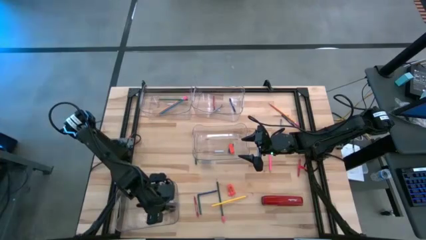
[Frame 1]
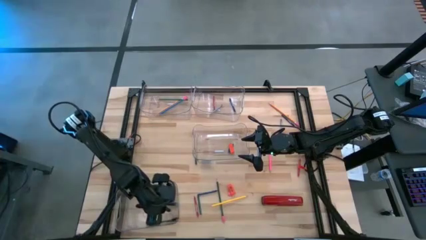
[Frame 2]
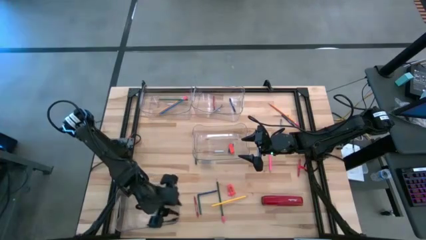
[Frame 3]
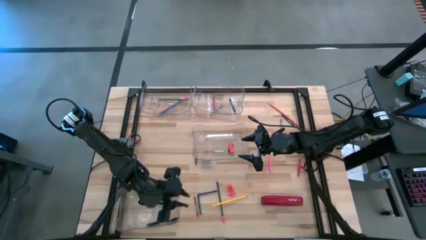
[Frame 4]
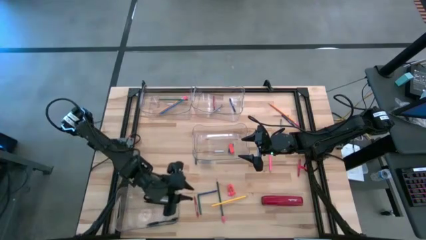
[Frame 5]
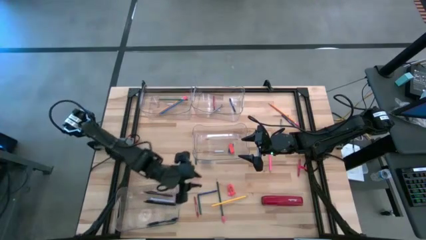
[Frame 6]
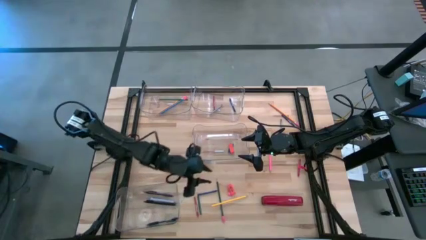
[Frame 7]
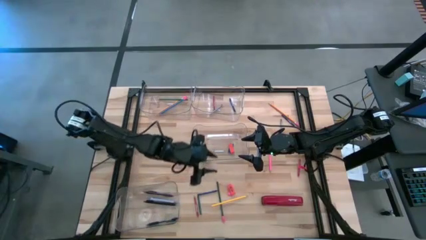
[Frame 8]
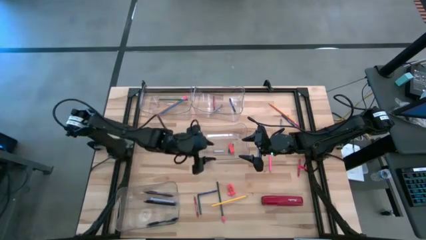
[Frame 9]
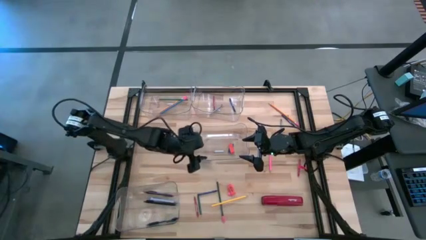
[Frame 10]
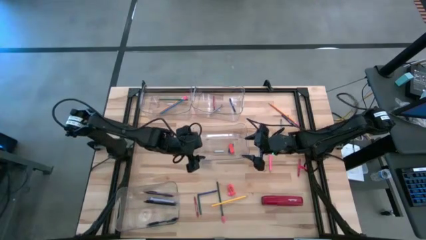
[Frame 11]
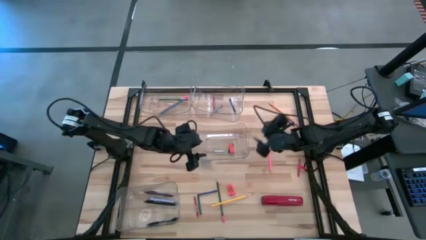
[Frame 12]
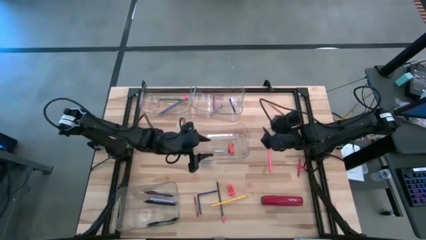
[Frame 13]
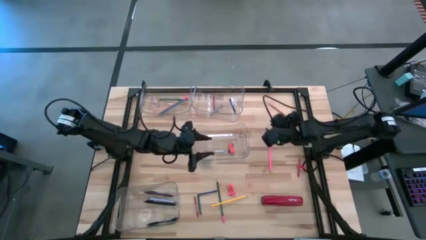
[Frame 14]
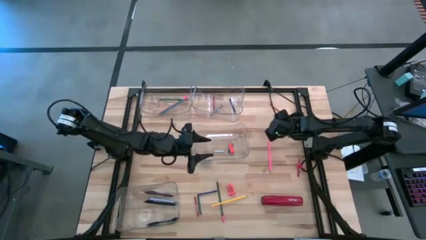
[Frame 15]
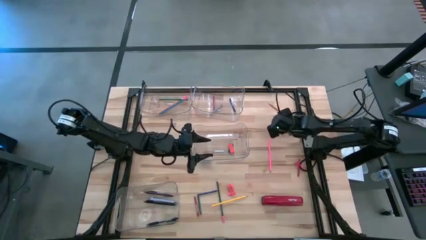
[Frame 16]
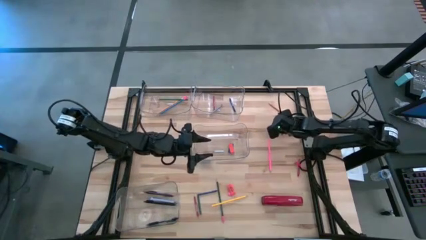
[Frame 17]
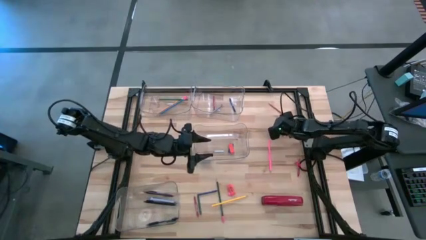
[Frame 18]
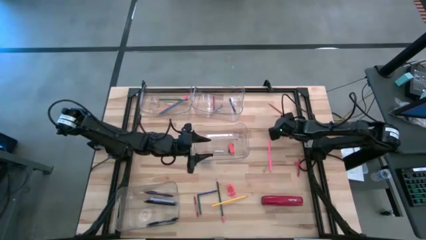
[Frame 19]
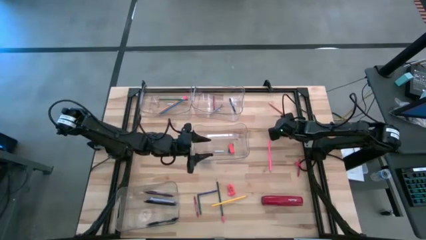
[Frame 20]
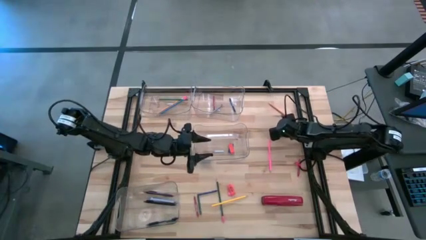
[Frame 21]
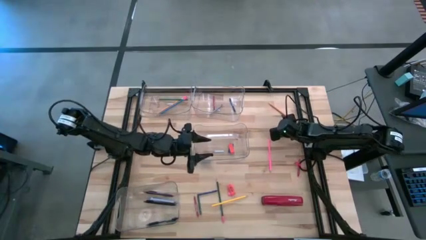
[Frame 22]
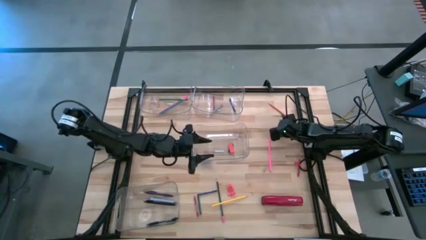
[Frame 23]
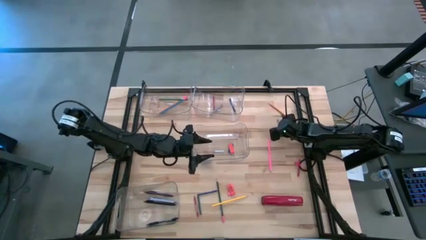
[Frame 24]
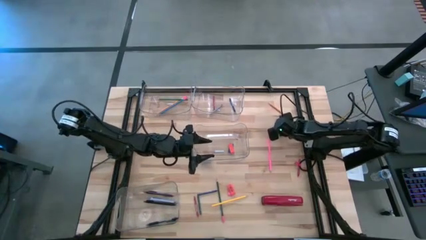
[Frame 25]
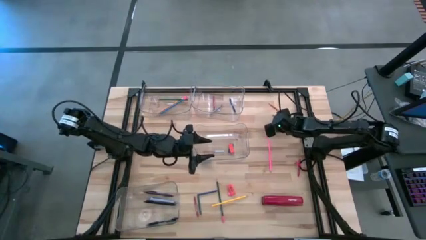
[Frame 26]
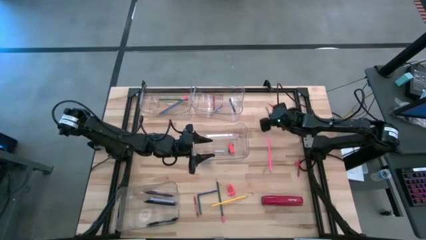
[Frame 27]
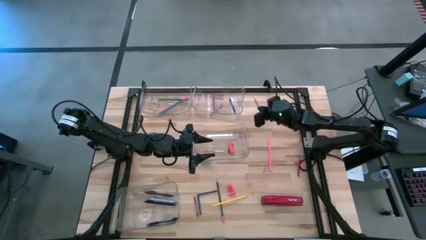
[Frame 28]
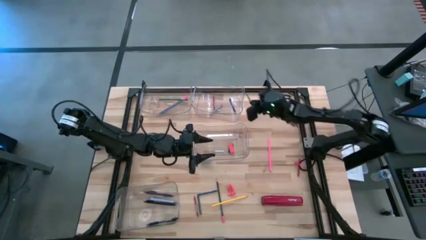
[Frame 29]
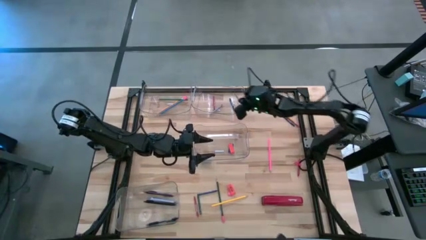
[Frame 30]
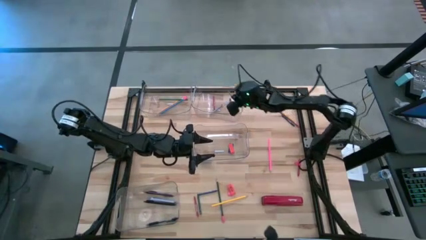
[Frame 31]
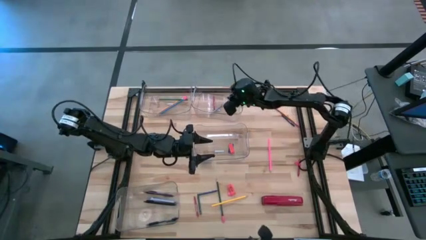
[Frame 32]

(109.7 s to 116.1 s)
Task: Sort crayons/erasers/pens/pencils in bins
Put the gray crayon into the top right transparent bin

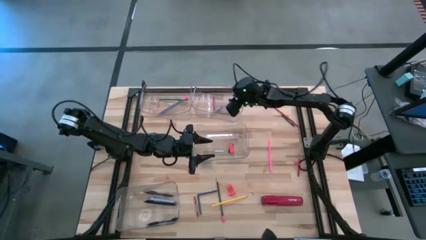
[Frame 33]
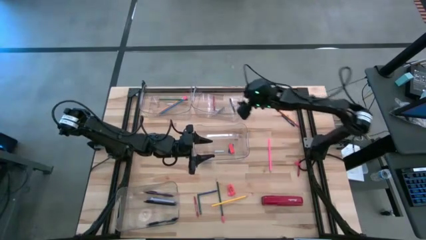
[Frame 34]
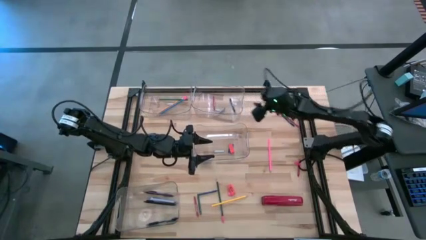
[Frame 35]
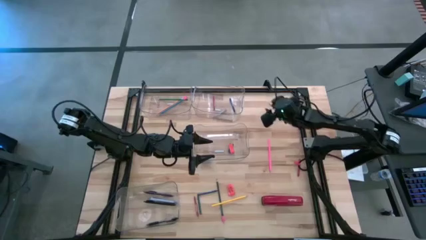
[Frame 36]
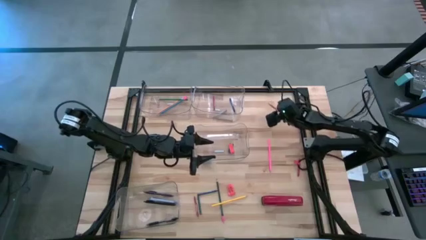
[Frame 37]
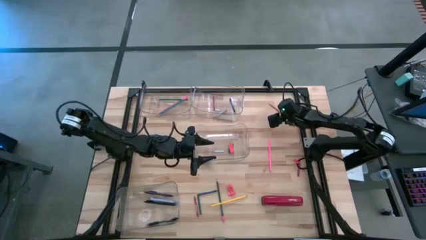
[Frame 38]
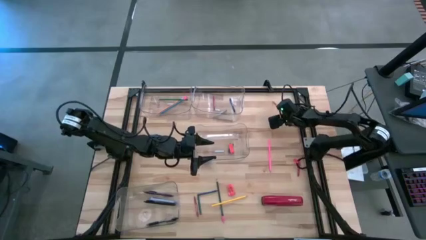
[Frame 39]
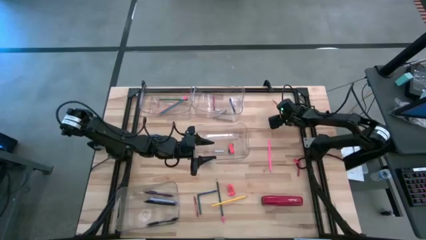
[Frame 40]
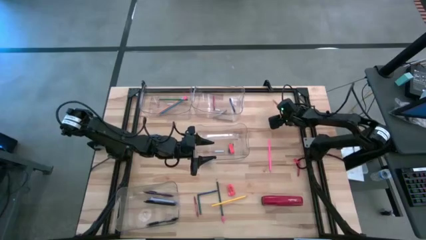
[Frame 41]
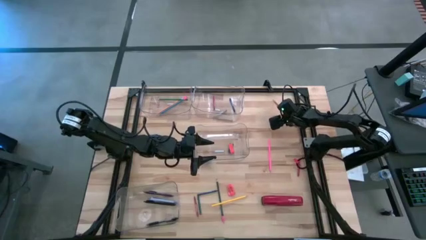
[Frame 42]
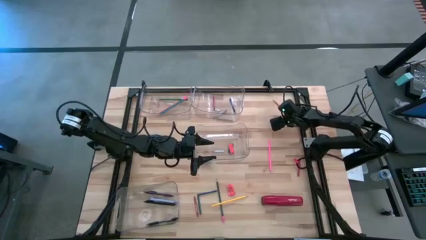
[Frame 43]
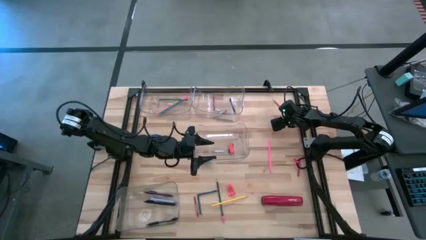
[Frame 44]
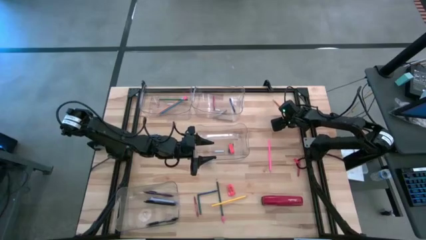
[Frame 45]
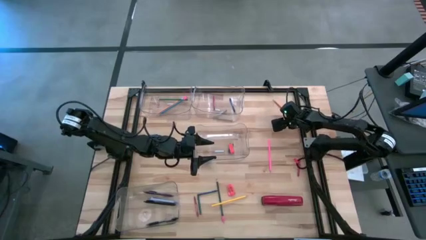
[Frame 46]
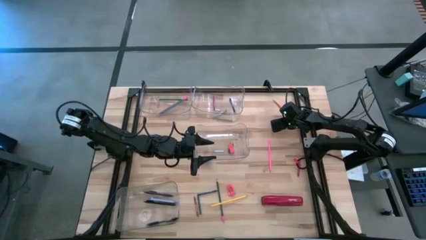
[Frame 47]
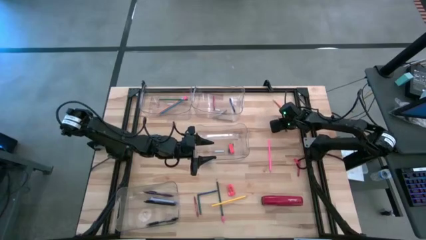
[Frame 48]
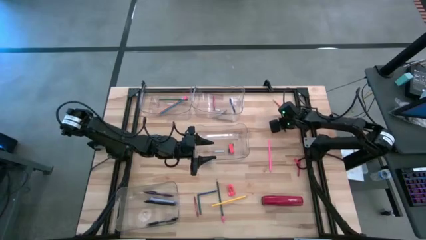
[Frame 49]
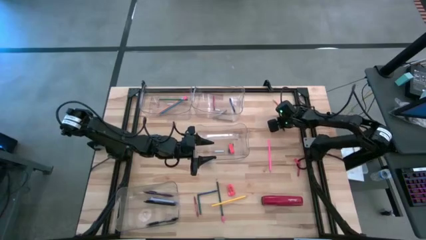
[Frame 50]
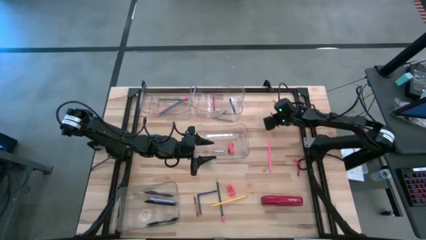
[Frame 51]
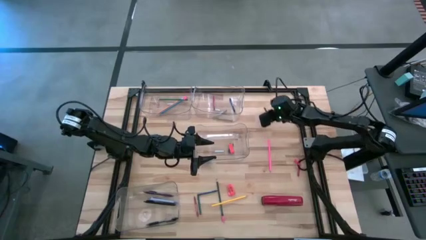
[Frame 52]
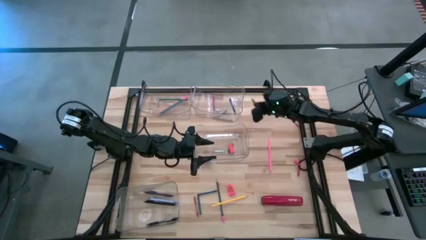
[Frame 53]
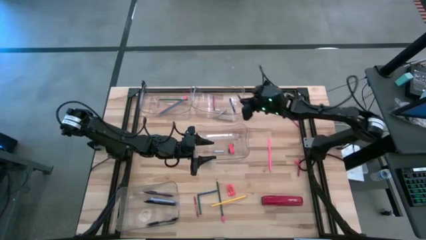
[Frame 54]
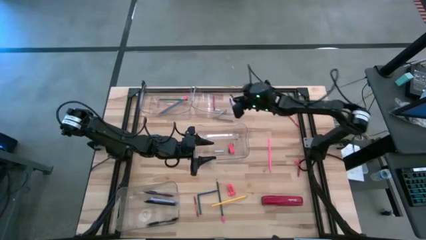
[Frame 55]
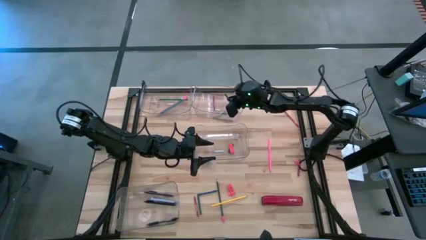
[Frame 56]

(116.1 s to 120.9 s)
Put the top blue crayon into the top right transparent bin

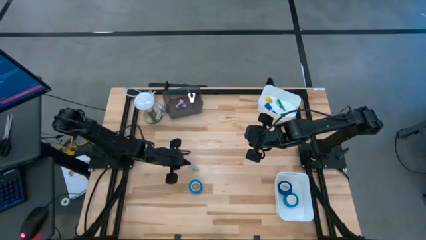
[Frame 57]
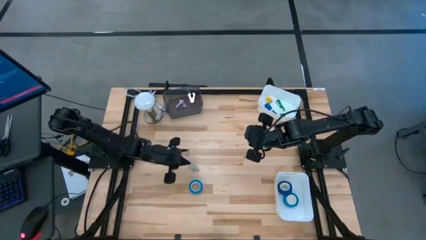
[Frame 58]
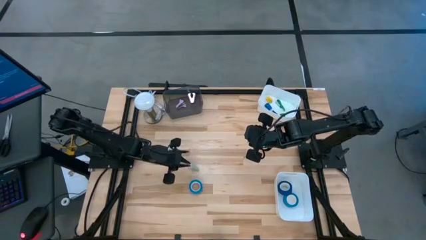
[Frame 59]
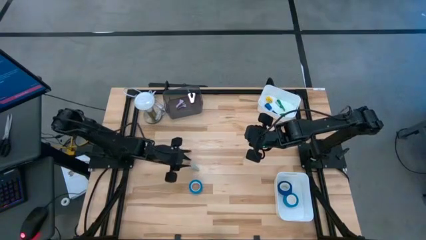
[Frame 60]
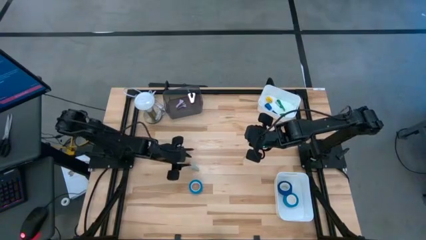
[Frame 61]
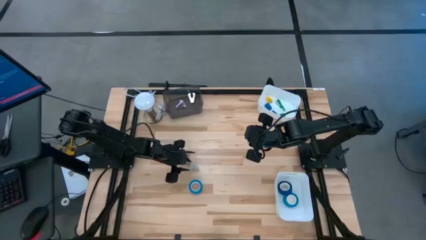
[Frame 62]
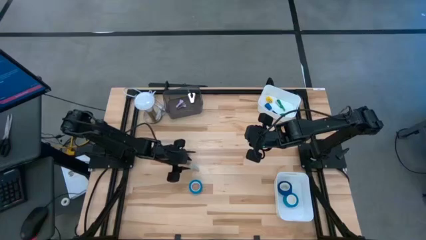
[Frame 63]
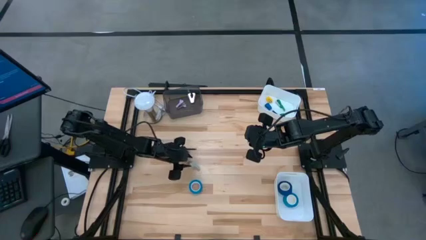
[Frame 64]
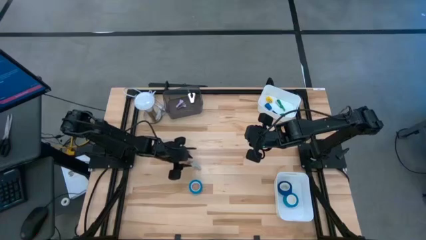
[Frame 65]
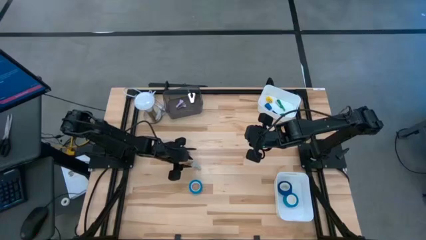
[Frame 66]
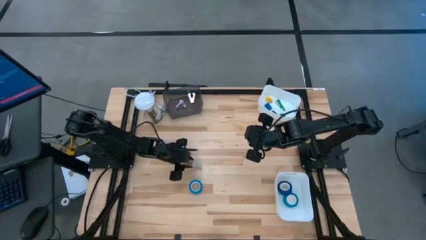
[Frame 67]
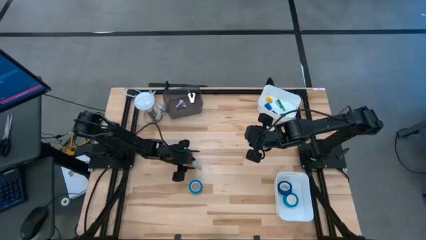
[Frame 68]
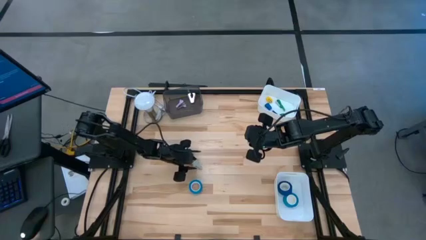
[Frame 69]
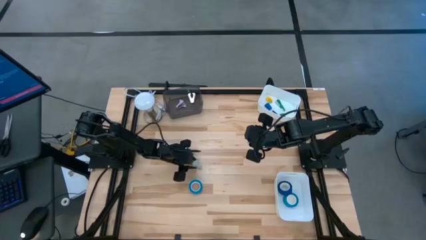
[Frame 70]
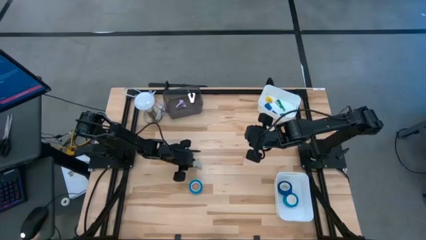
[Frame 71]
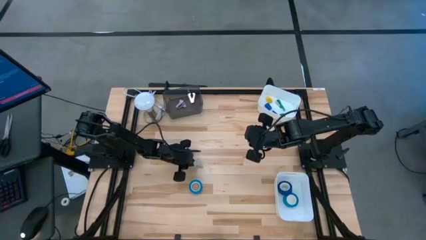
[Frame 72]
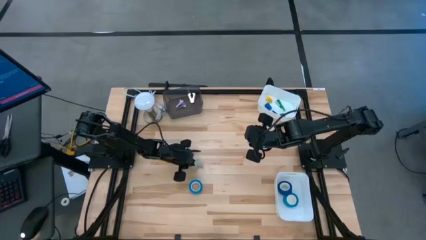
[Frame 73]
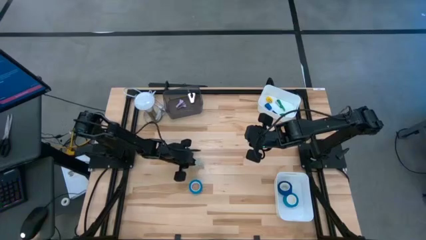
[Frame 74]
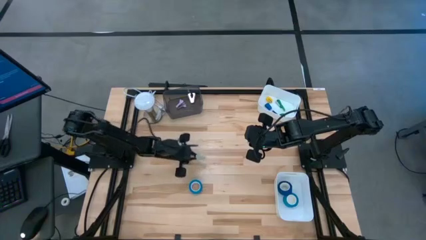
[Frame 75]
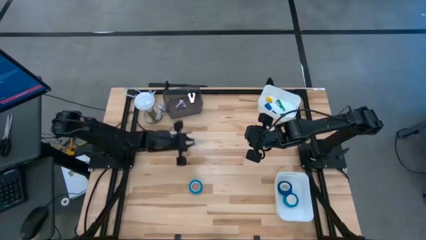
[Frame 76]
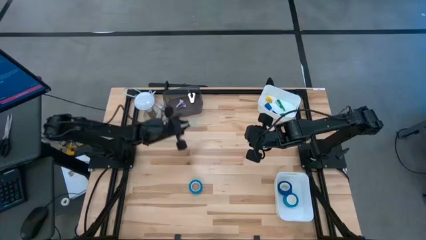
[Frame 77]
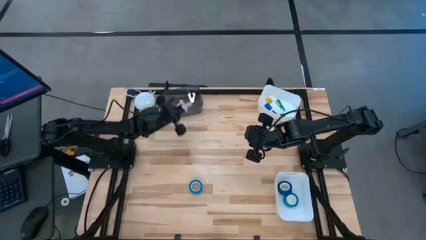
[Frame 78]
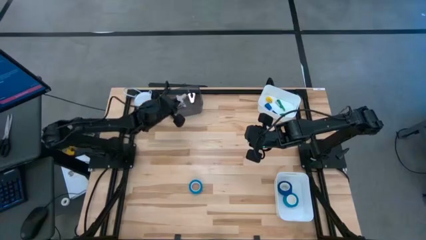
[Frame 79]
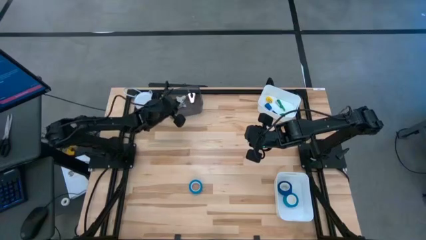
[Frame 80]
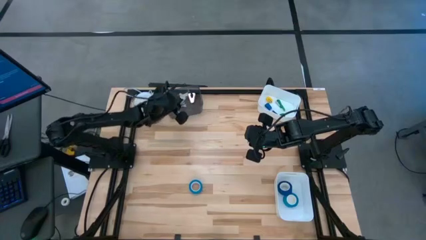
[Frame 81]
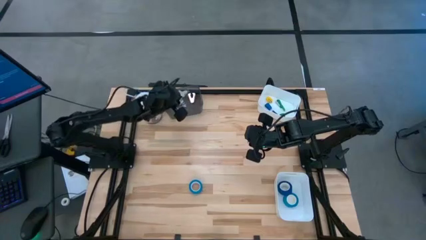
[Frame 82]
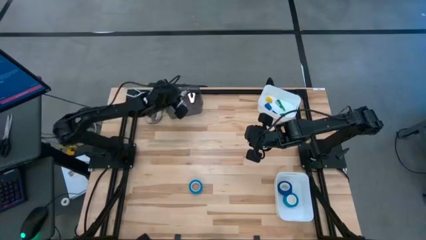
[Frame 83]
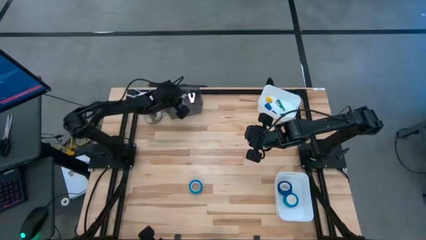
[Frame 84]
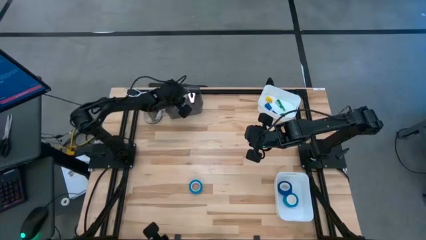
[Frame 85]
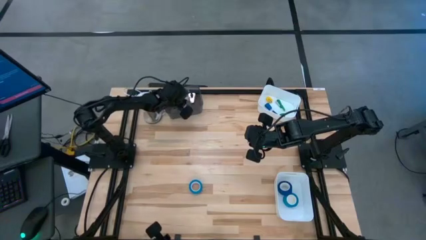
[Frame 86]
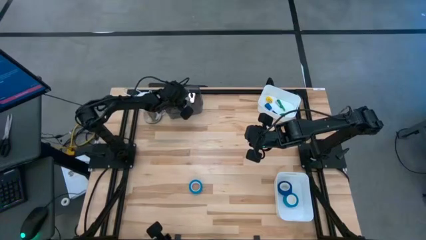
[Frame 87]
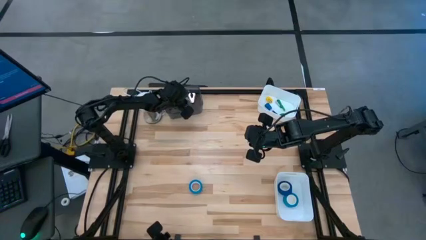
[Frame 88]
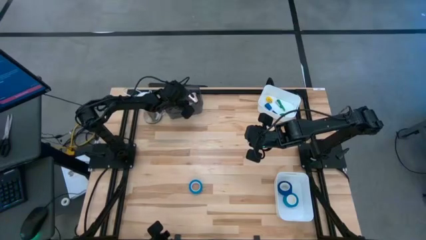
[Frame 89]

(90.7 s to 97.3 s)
Task: Pick and place Stapler, Stapler remover, tape
Put the gray staple remover into the black bin
